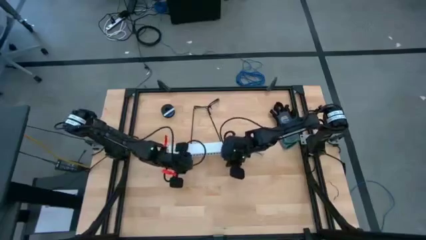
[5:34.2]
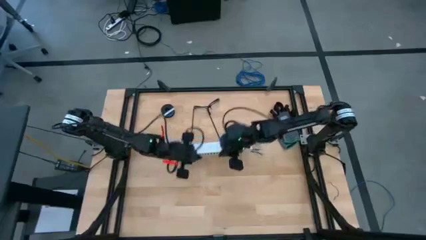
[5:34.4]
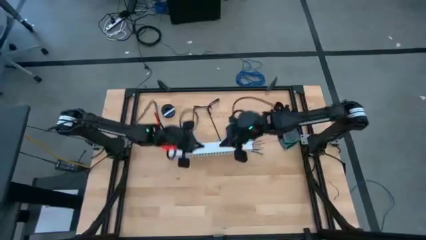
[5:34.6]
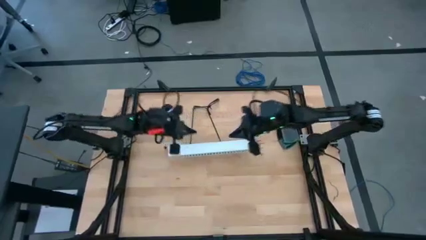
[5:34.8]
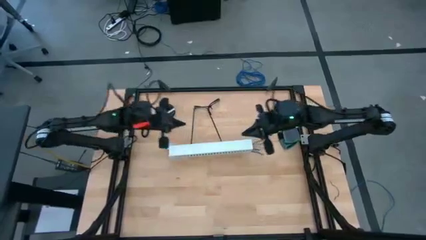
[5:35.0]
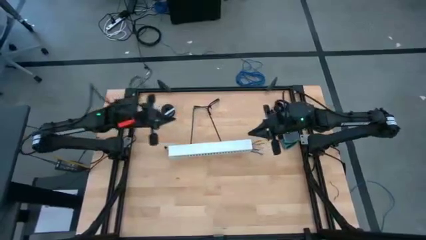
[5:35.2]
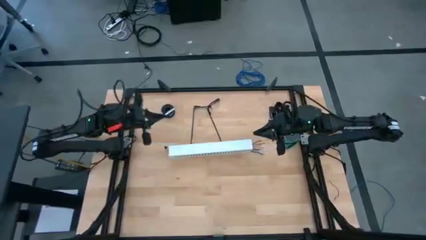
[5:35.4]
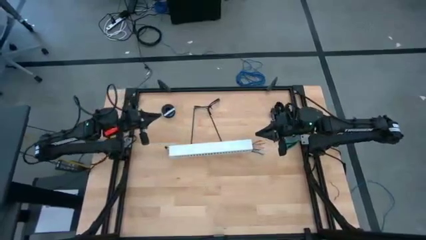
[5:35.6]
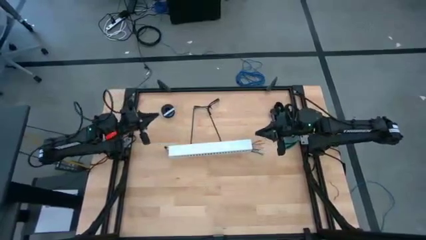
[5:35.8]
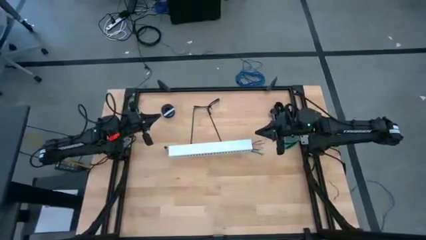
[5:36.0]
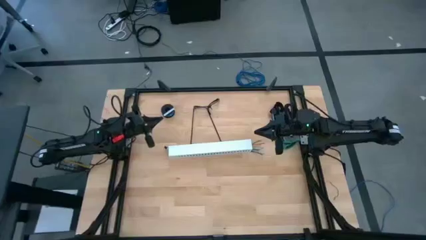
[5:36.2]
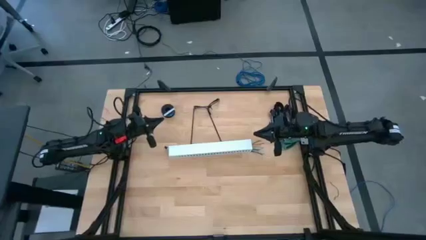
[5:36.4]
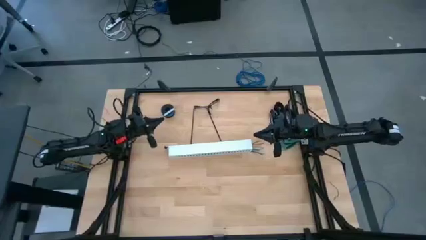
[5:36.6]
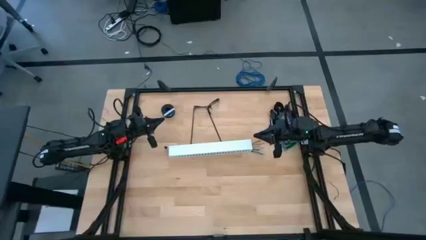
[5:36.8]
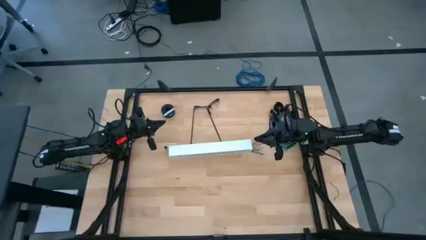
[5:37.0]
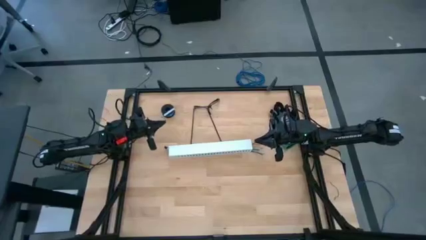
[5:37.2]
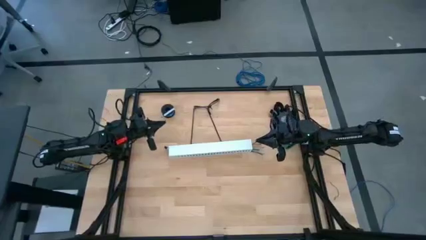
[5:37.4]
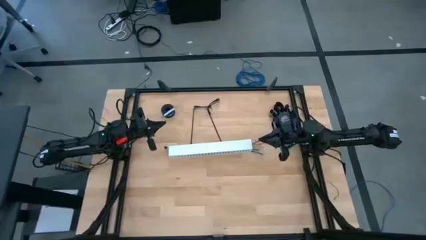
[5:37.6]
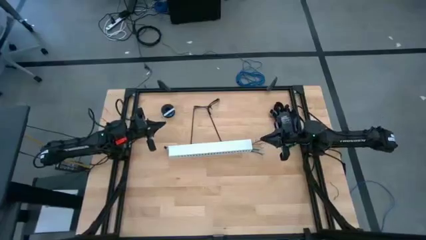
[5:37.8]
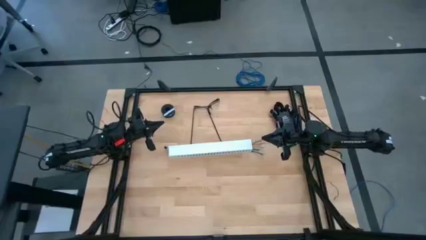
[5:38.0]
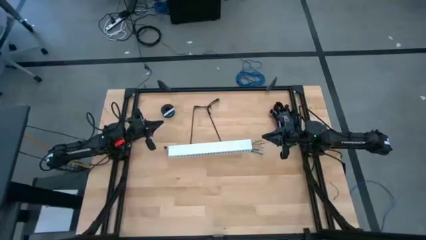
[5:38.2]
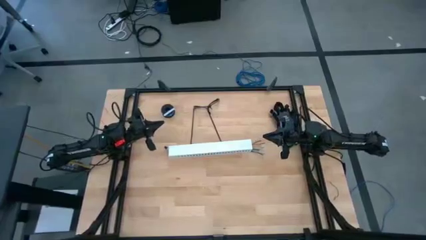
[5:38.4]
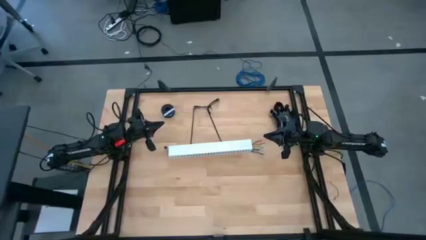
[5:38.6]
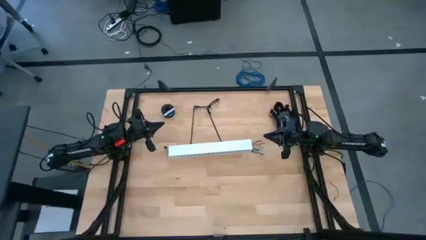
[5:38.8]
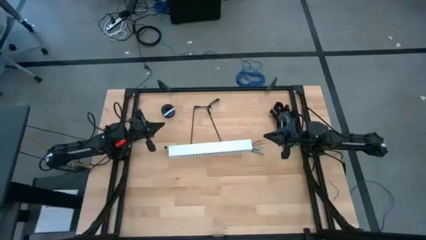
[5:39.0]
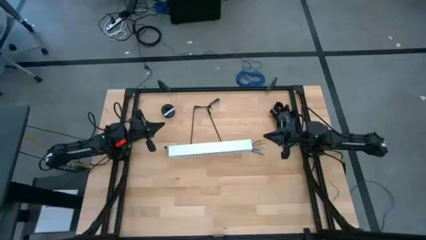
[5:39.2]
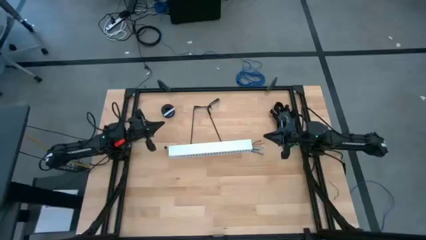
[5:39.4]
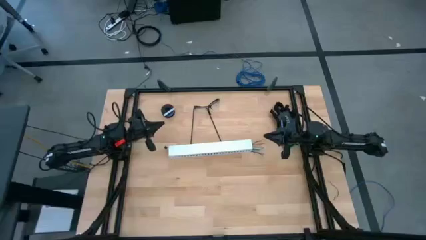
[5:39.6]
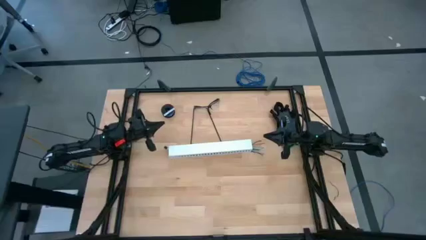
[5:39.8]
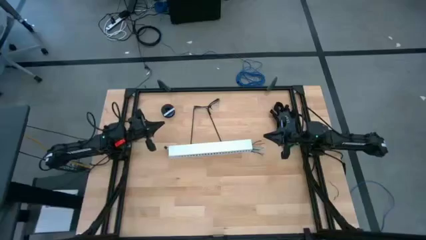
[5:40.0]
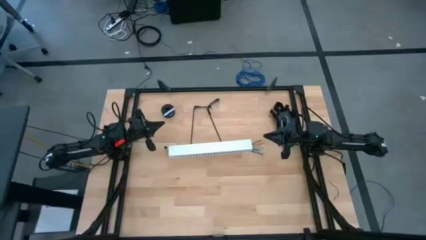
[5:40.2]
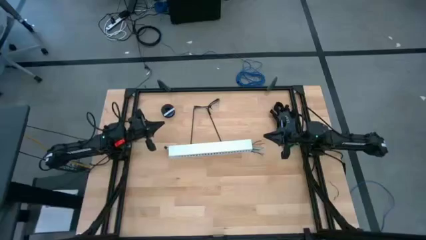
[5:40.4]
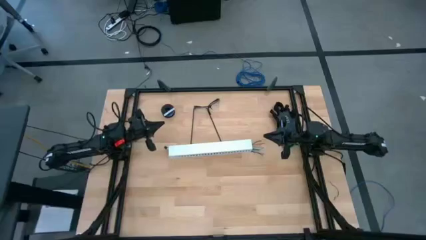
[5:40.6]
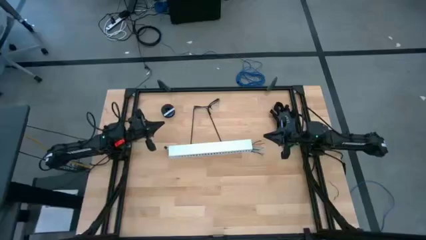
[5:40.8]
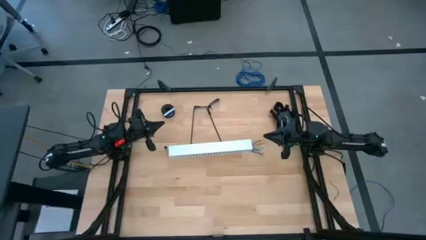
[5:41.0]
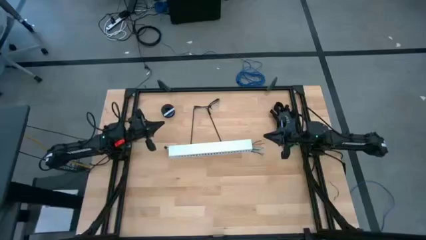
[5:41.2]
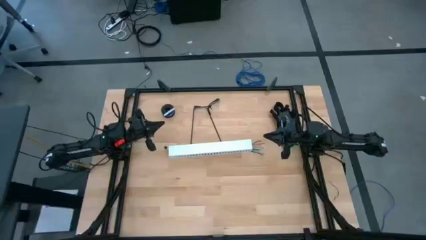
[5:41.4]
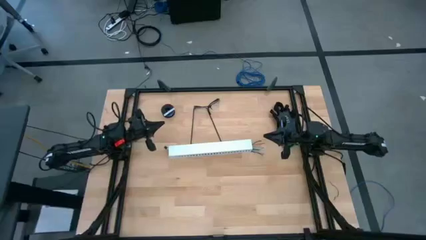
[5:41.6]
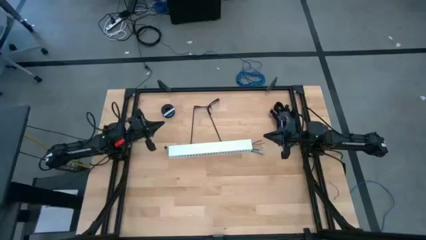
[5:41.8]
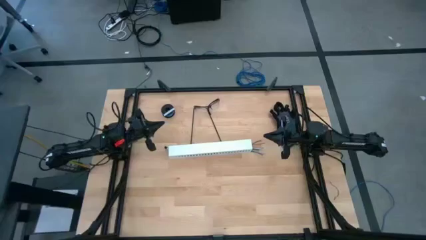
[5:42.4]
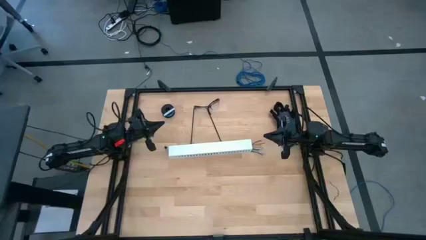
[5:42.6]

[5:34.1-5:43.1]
Task: Ziptie cables
Return to Home Position

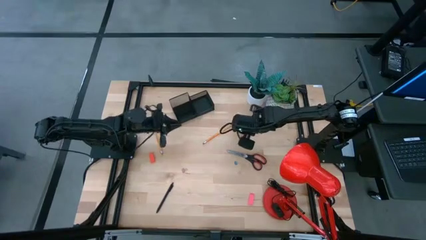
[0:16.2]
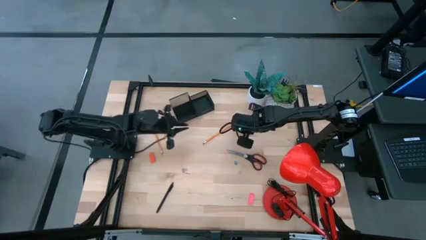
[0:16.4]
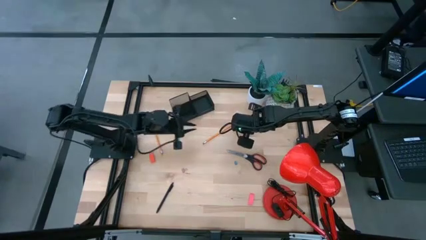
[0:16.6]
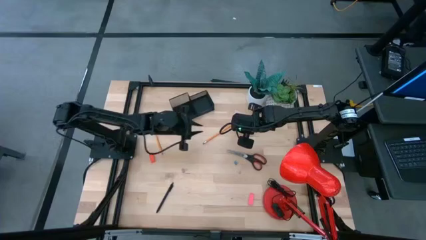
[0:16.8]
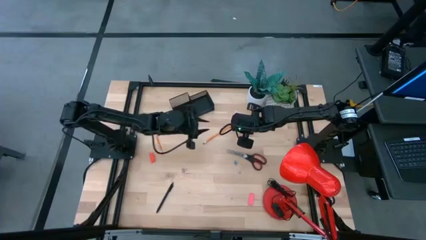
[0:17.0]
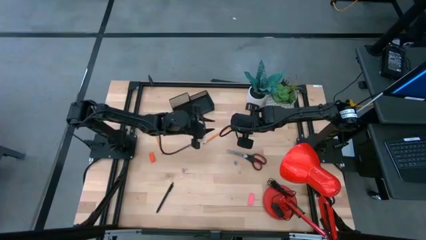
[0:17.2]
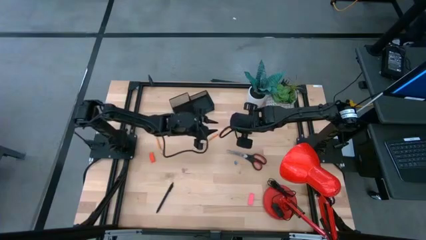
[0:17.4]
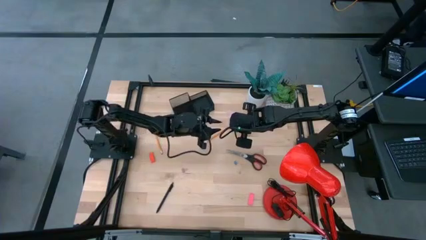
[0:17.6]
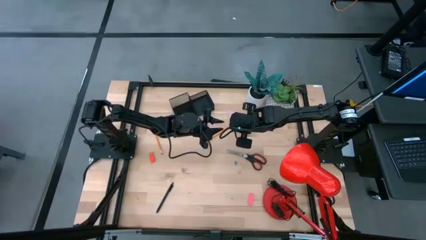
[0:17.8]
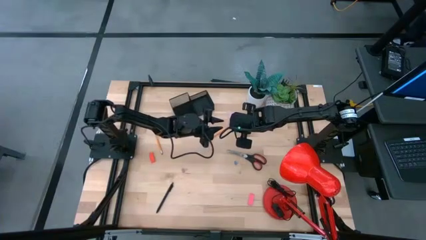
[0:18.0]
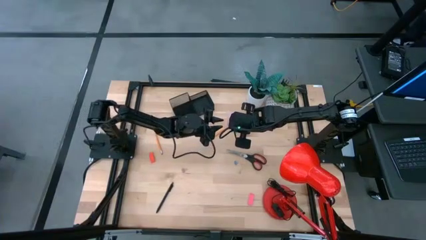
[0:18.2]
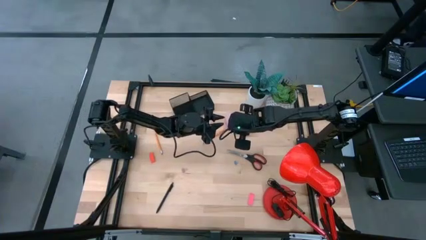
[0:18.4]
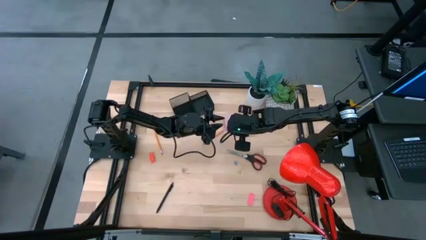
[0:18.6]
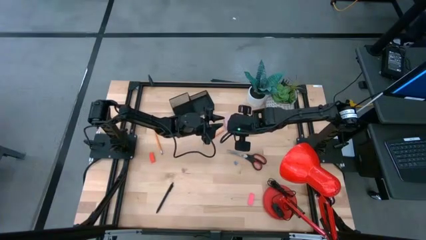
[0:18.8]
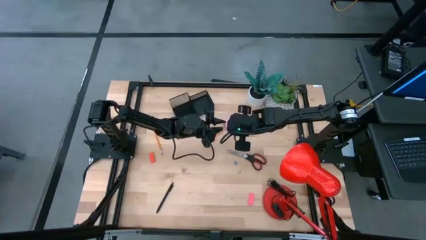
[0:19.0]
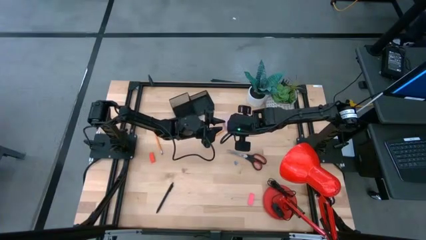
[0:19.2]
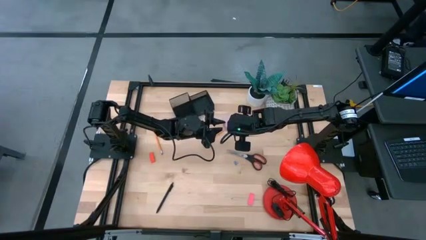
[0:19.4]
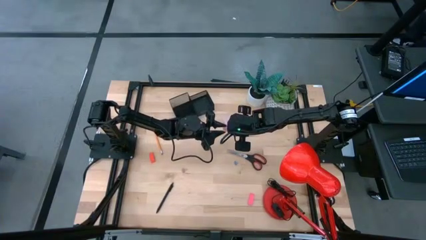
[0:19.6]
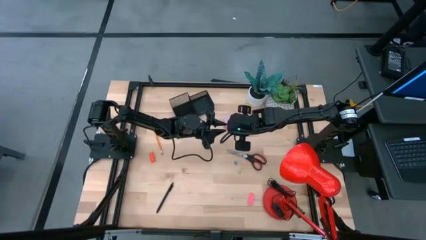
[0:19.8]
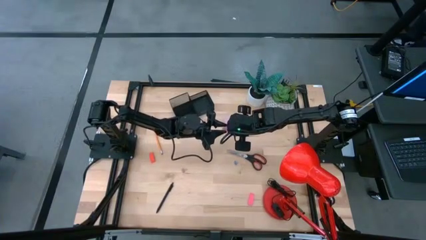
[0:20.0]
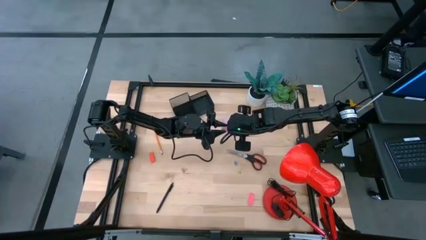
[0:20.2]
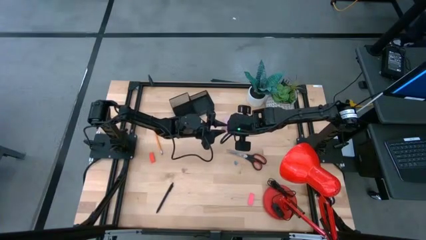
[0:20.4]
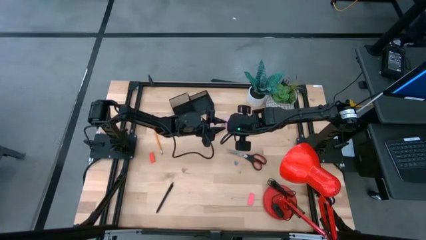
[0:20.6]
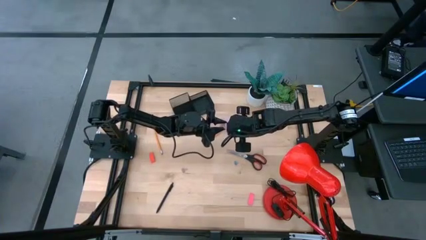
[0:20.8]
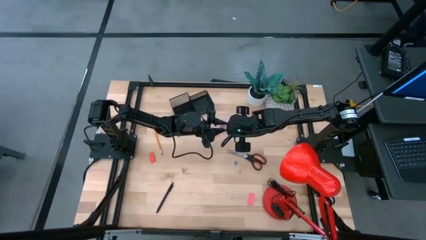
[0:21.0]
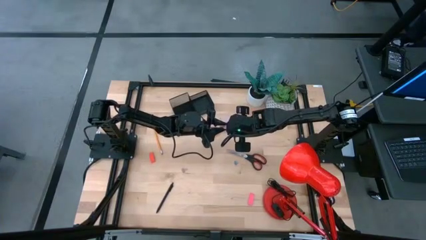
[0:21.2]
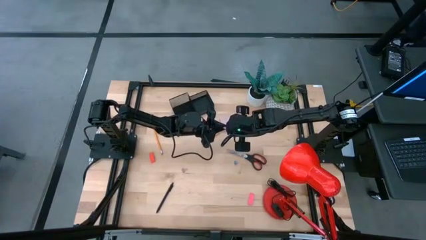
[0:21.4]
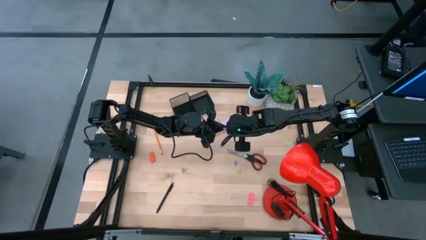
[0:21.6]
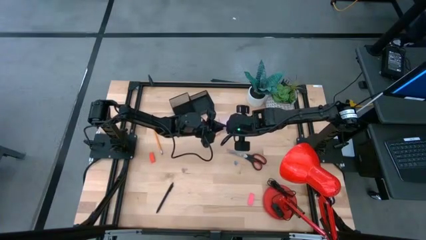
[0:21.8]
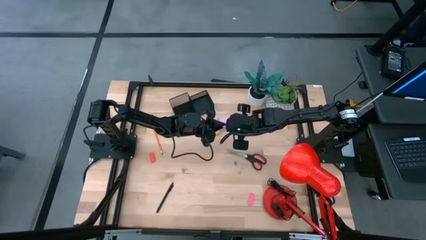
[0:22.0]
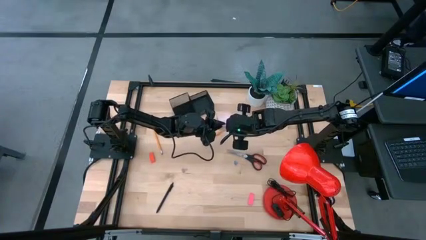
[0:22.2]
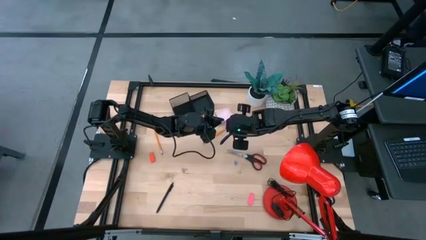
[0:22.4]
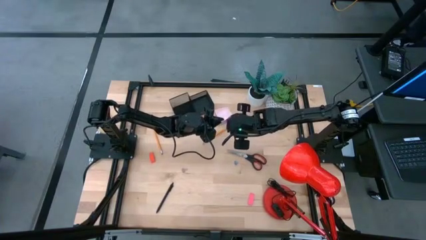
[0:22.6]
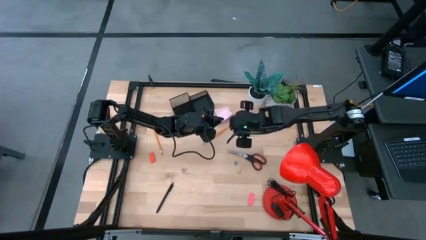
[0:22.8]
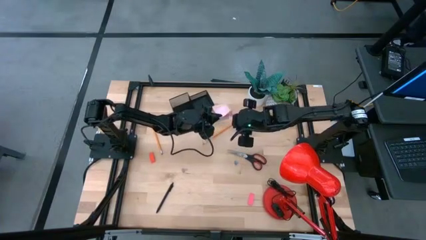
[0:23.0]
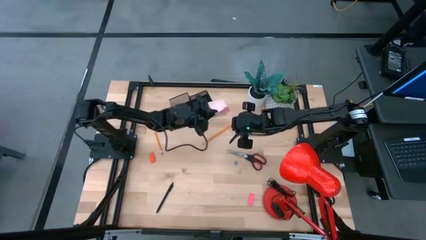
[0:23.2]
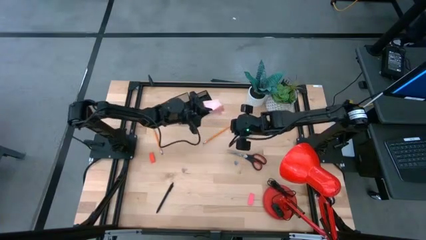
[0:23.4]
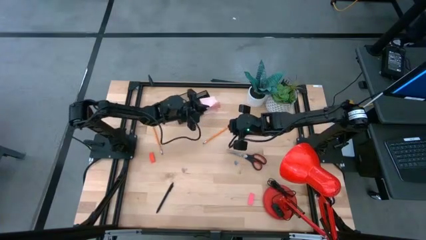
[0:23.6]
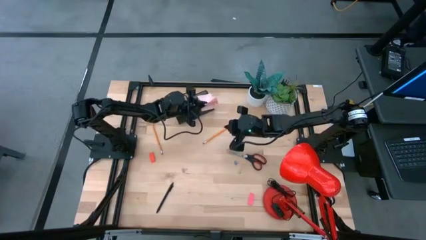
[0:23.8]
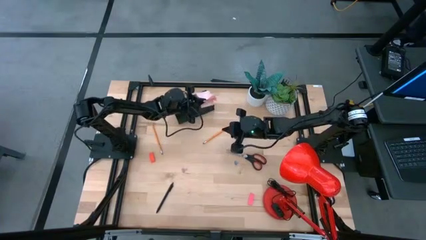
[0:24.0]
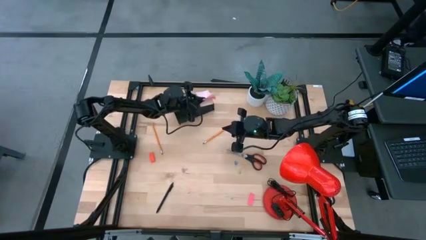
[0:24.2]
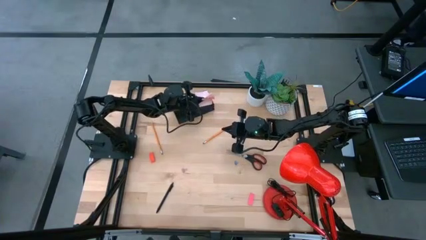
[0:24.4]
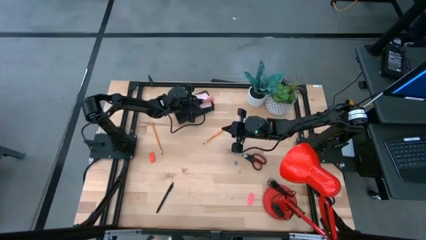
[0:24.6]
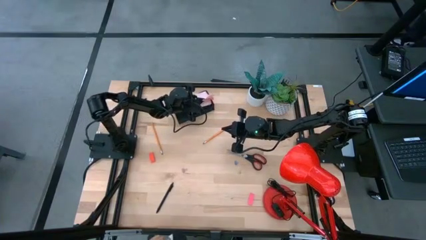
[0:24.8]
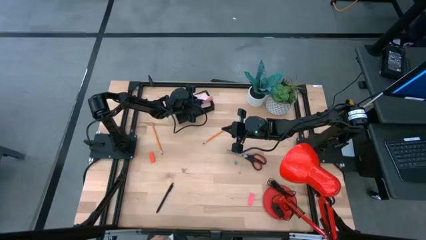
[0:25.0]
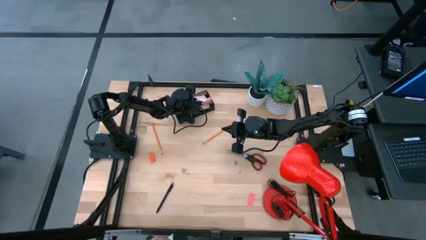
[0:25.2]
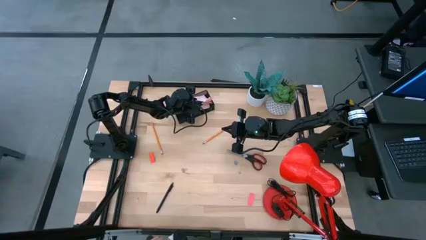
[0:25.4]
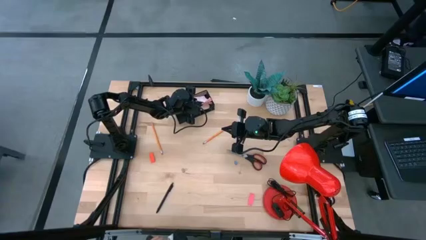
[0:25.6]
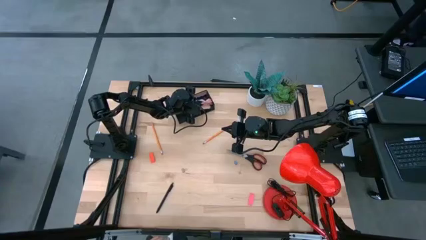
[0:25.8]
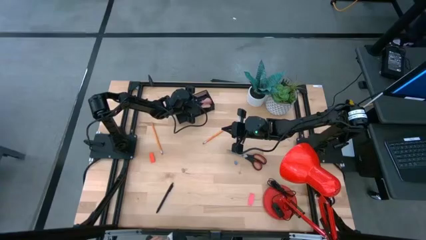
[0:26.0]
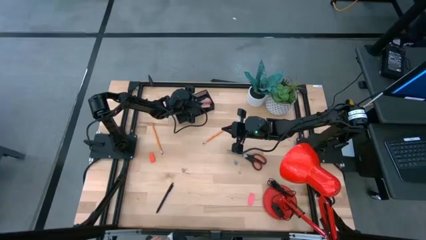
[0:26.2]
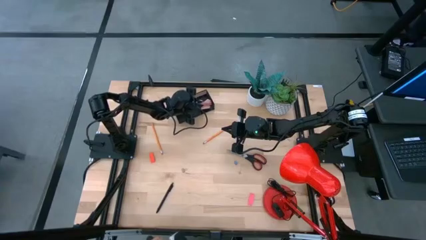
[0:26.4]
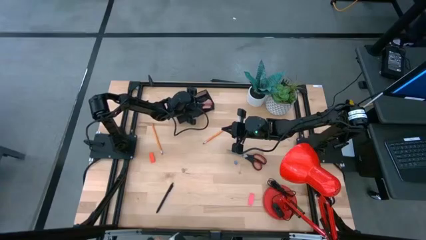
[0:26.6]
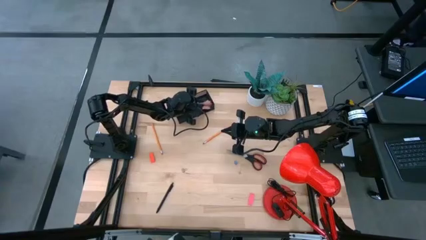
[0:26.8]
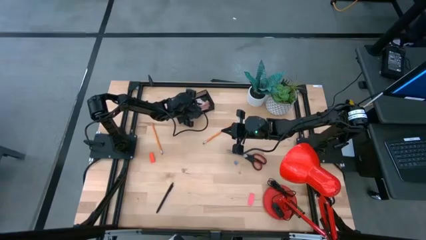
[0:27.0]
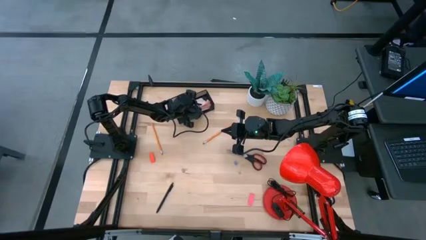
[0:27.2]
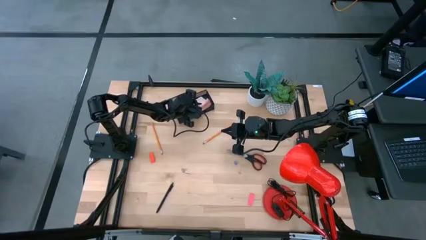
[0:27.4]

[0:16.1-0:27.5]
Task: Pick and place office supplies into organizer
Put the sticky note into the desk organizer
